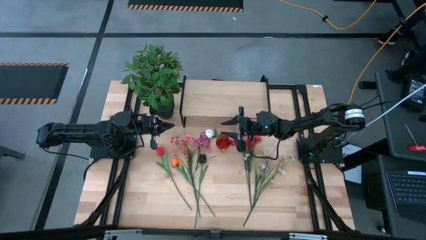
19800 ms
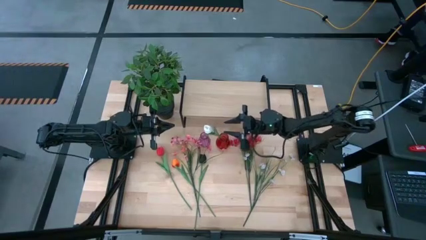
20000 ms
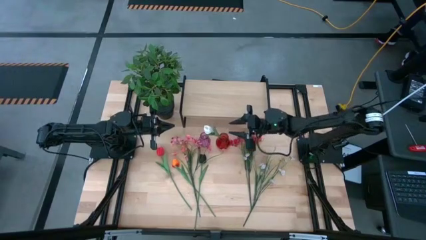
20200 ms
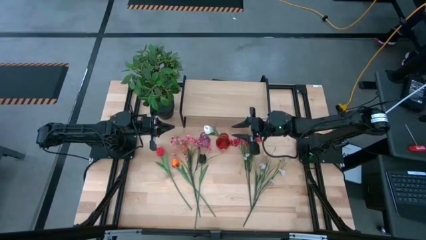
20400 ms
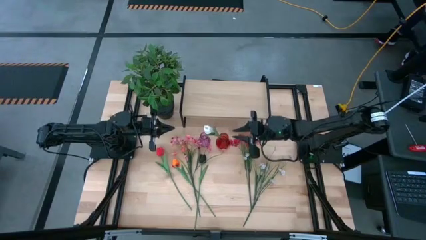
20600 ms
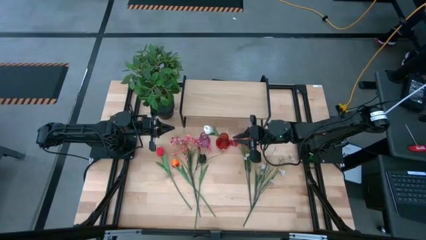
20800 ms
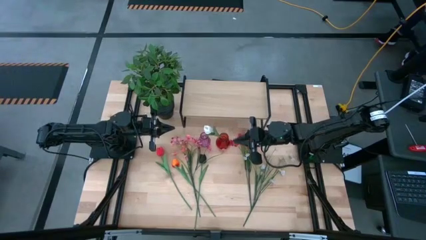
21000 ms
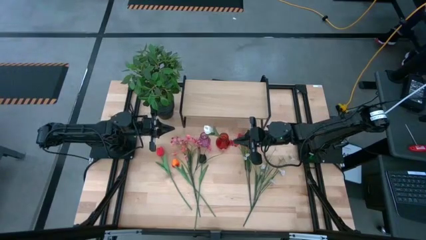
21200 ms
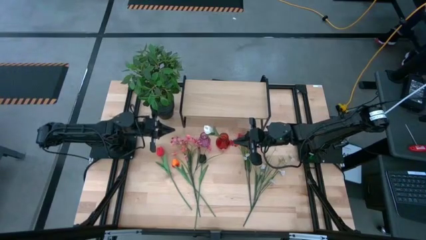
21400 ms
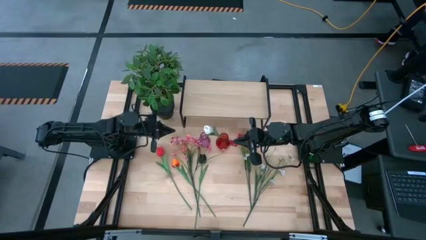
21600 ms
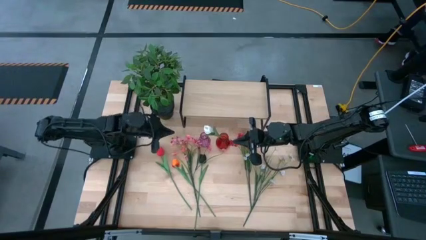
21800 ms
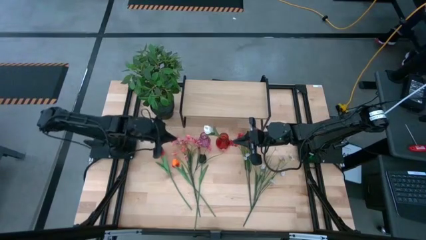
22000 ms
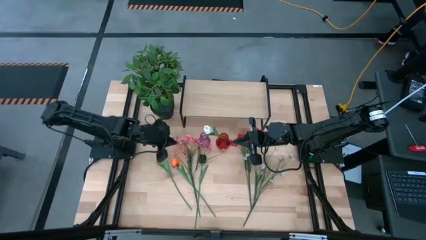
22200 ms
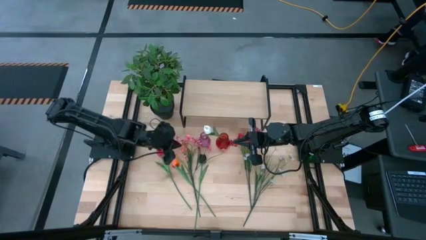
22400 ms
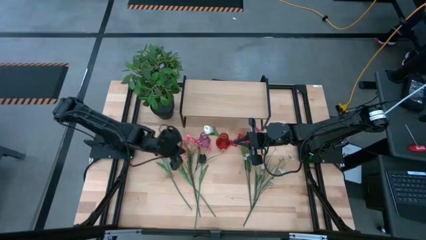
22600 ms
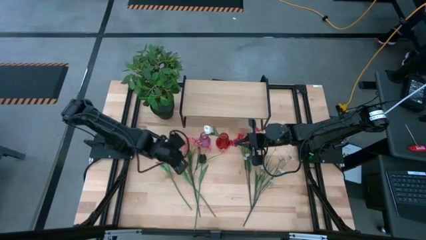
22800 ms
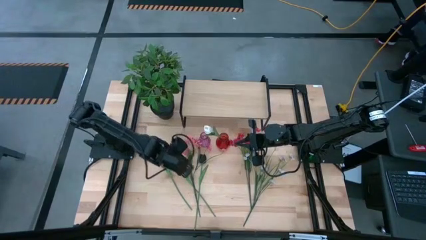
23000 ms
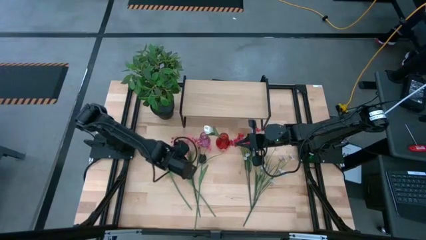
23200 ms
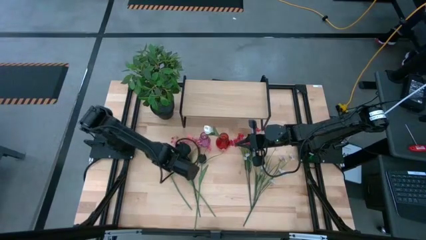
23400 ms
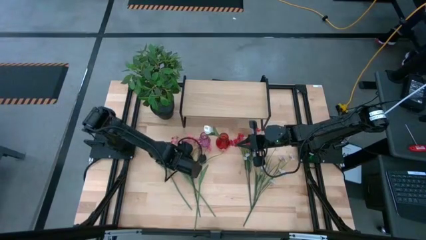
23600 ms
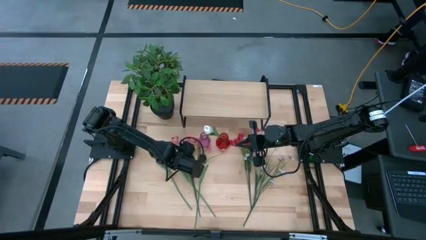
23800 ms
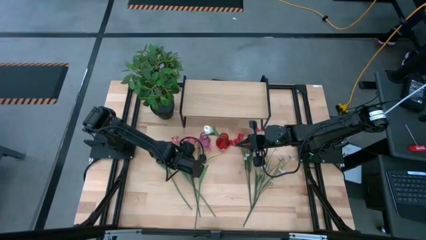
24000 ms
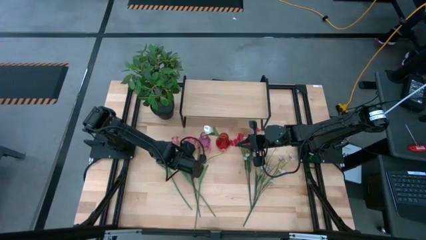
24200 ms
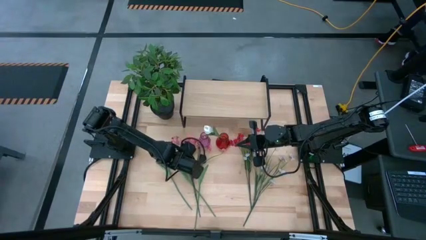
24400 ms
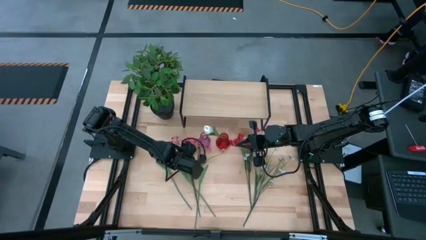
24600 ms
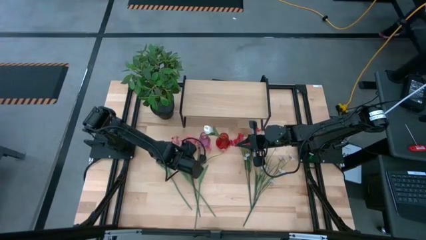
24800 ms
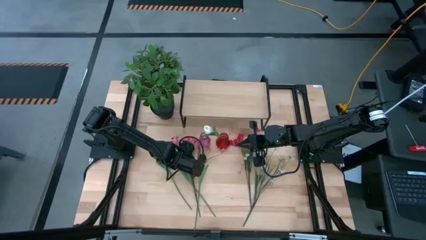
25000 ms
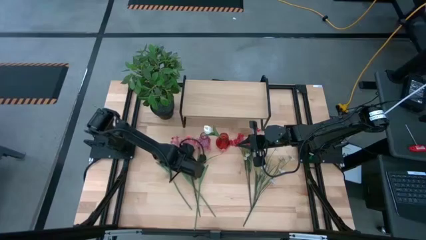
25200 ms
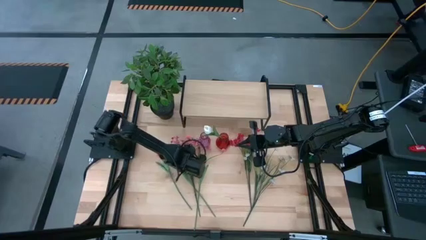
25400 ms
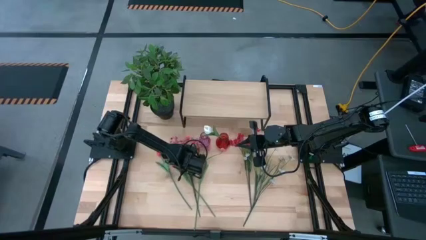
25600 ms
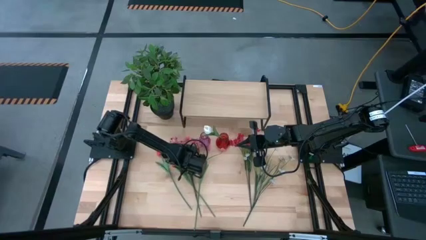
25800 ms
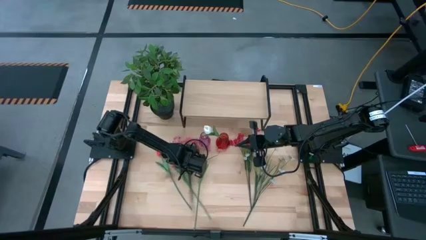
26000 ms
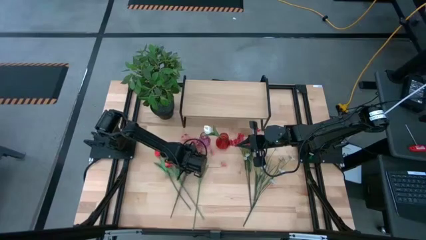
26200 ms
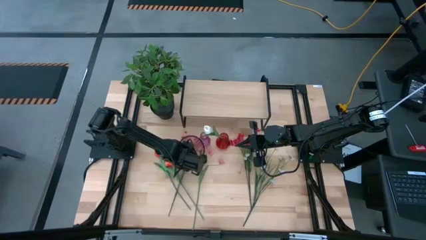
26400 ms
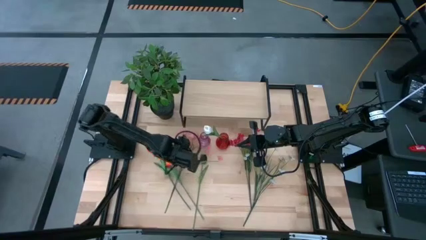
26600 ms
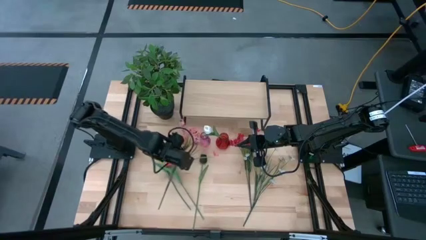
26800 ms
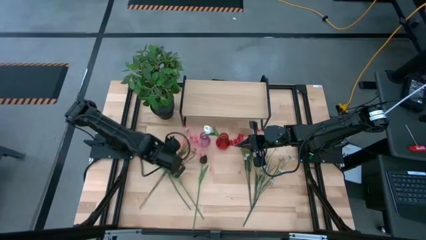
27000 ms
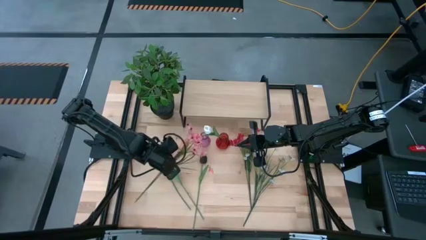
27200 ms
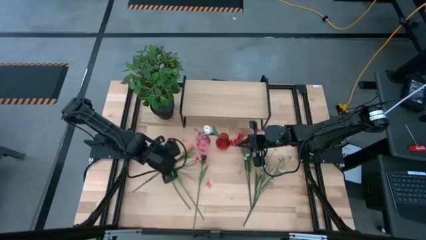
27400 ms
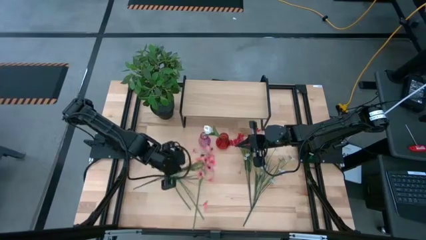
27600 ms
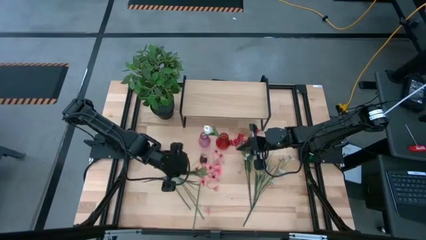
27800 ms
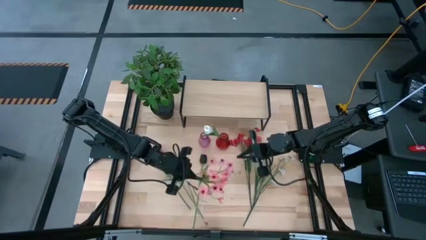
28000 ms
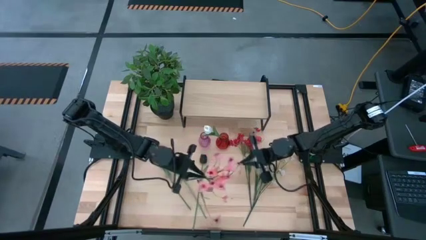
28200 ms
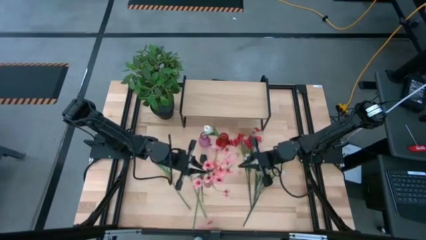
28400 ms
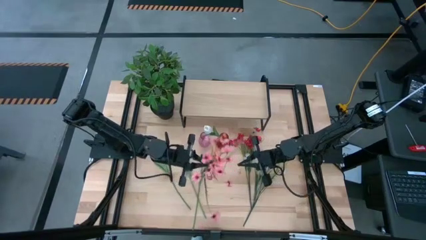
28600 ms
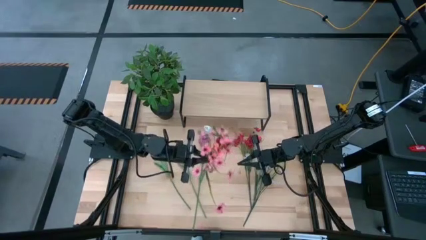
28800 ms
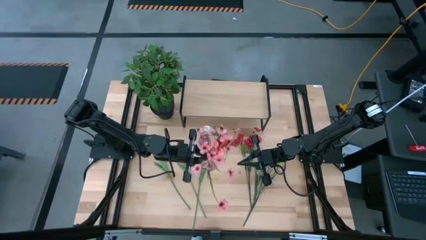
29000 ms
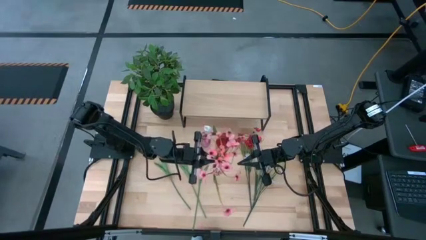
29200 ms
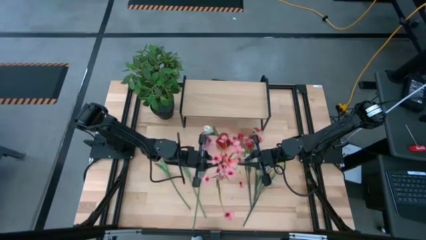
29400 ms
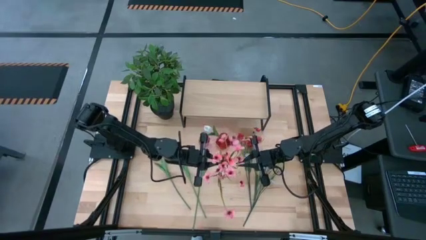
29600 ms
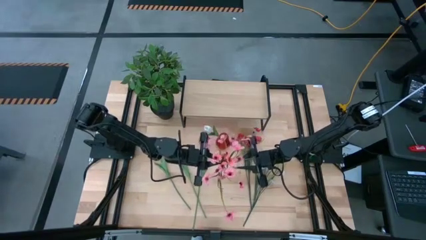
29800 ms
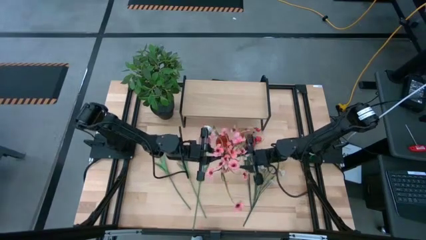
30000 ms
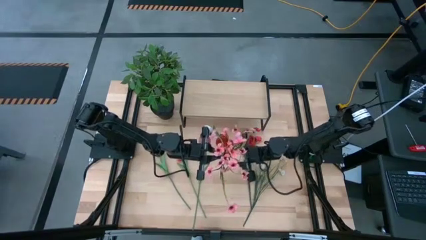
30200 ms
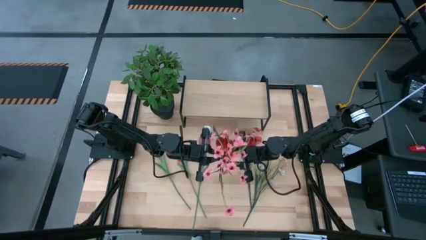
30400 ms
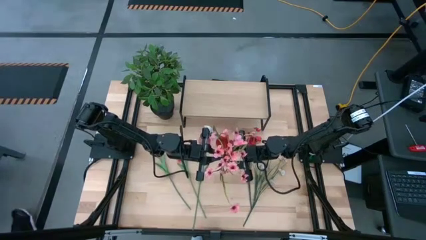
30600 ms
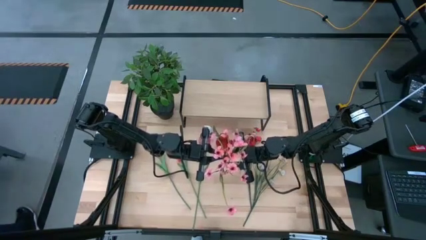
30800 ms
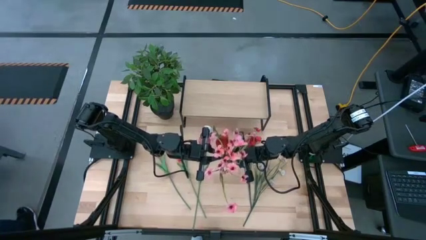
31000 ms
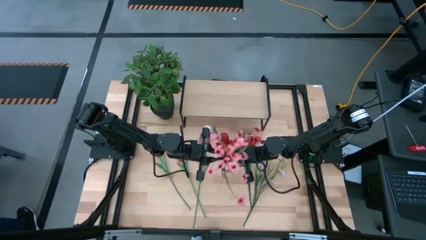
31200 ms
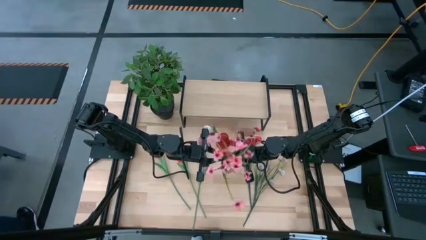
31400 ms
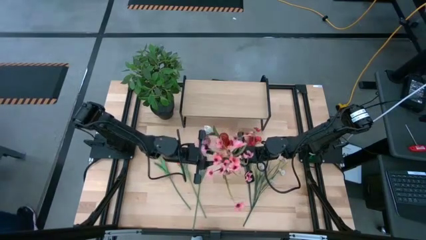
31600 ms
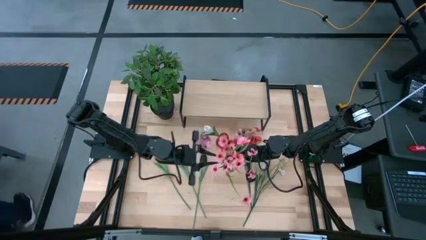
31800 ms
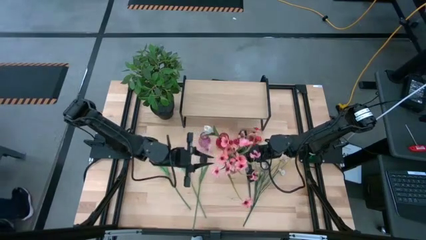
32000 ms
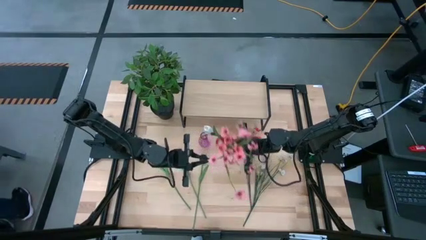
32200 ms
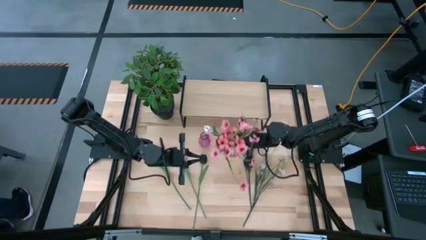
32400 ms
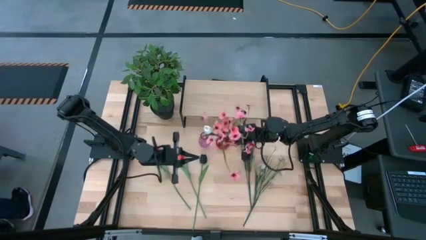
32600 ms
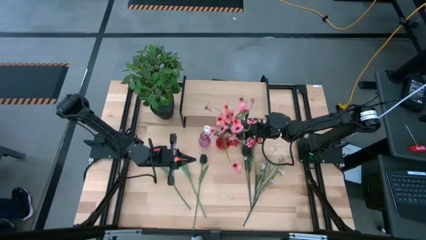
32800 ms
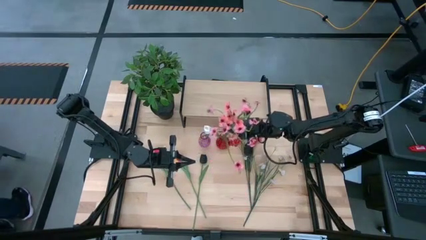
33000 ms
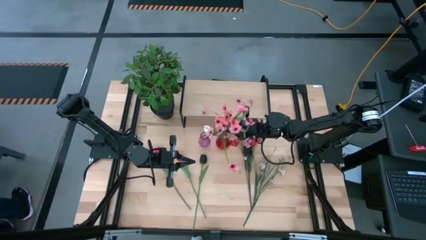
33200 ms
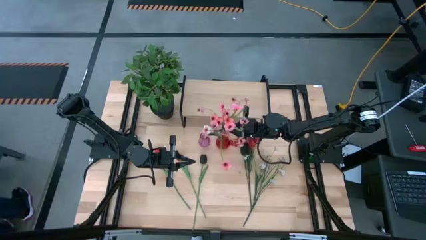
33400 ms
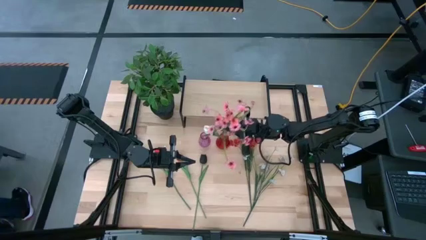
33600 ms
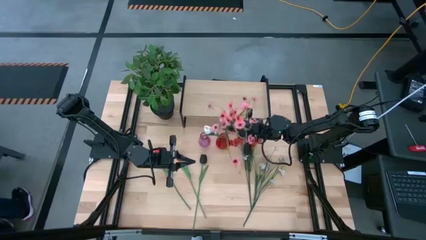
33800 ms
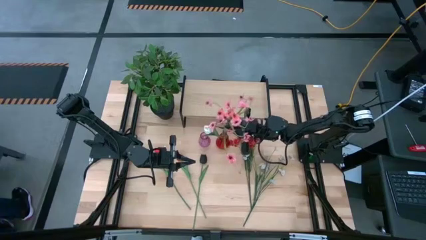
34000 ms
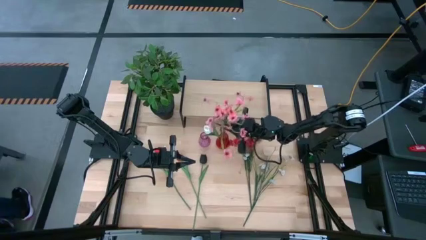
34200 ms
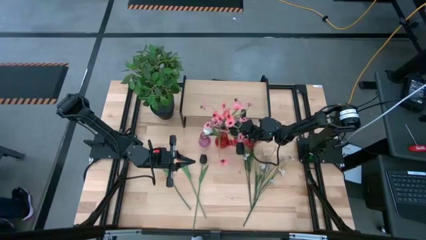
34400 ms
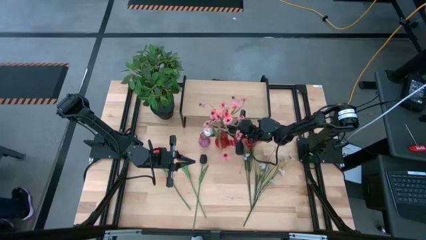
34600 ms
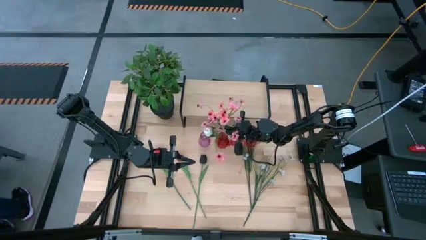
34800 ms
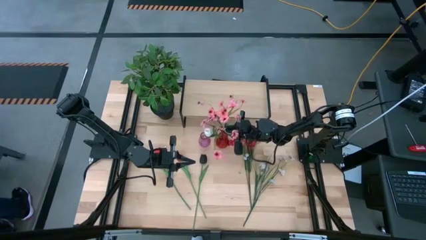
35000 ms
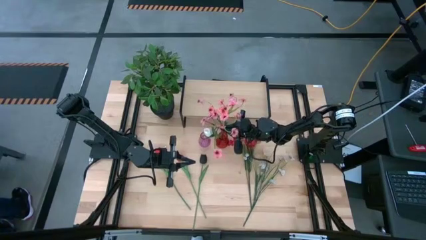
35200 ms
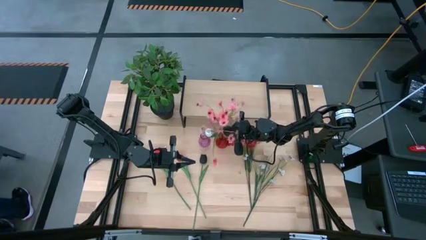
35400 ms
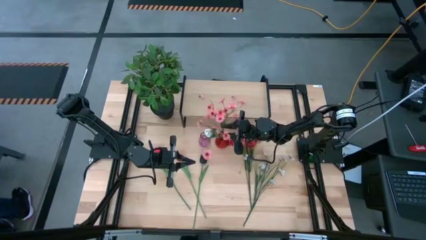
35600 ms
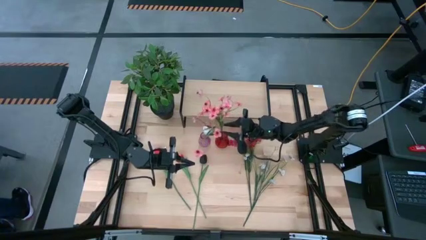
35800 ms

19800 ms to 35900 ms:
Task: Pick and place flowers into a vace then onto a shelf
Put the pink flowers into the red vase
